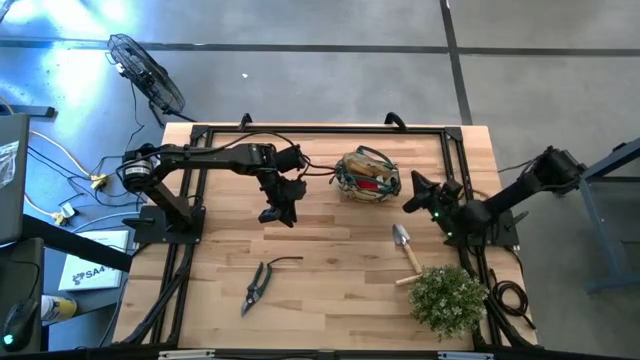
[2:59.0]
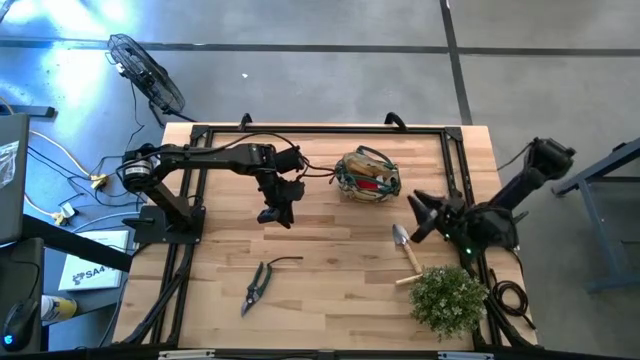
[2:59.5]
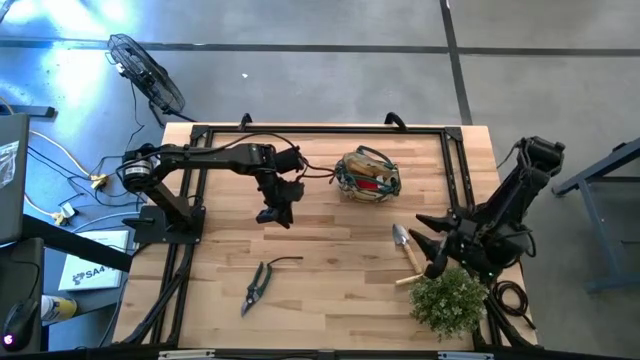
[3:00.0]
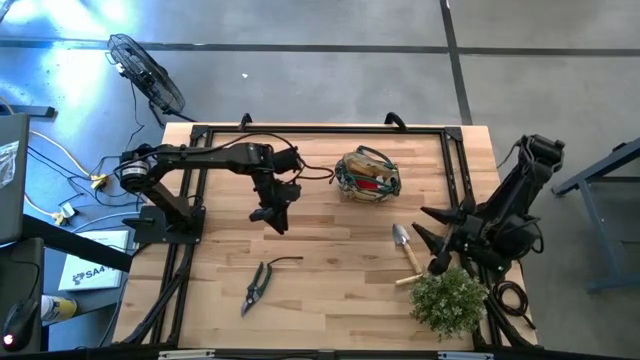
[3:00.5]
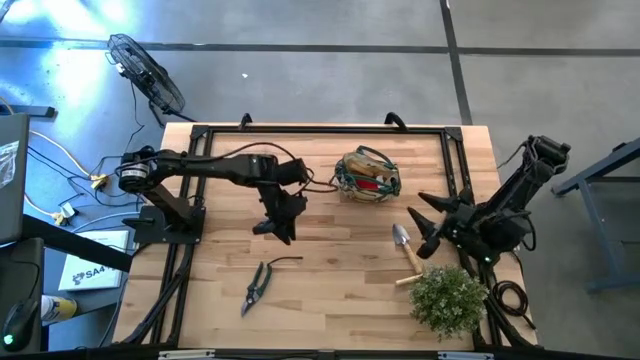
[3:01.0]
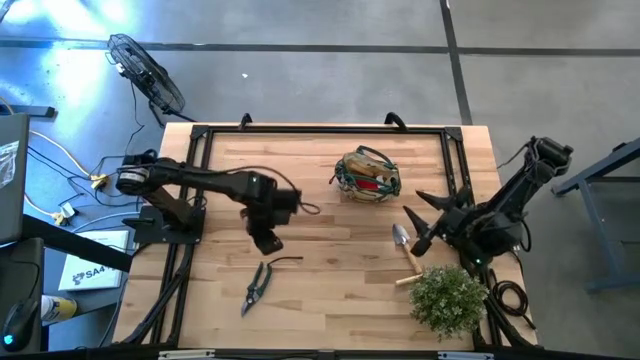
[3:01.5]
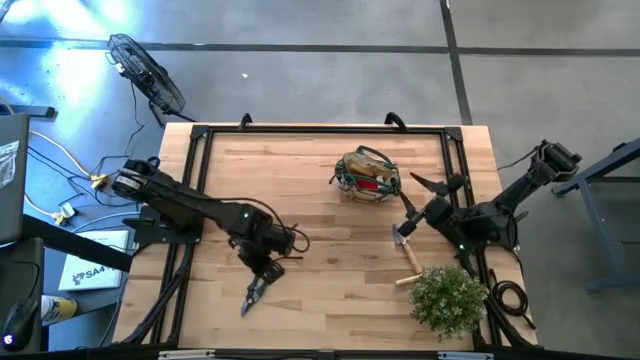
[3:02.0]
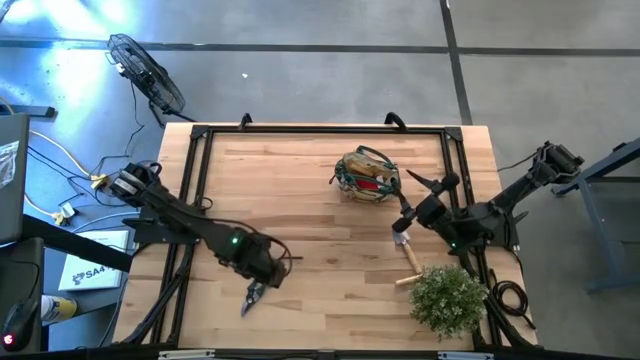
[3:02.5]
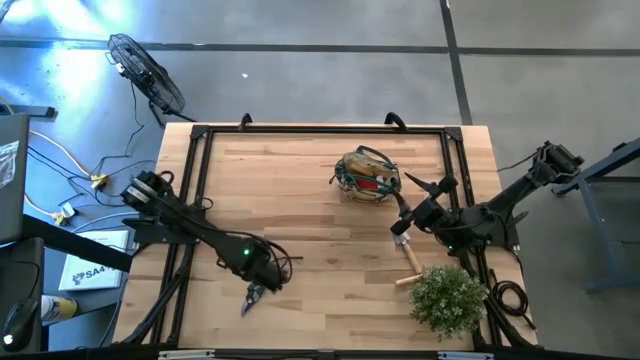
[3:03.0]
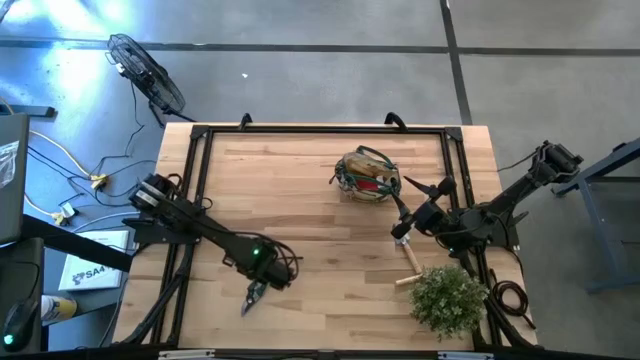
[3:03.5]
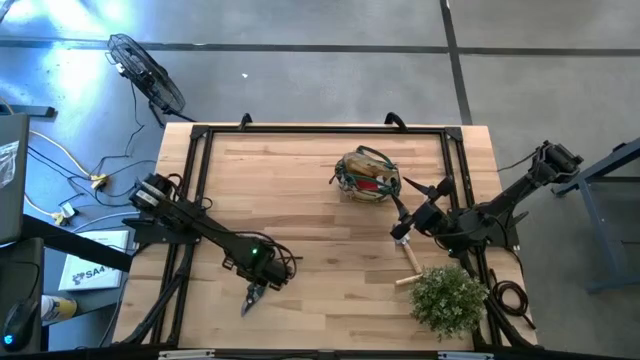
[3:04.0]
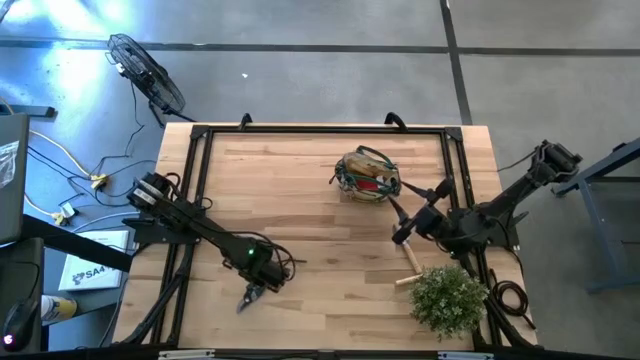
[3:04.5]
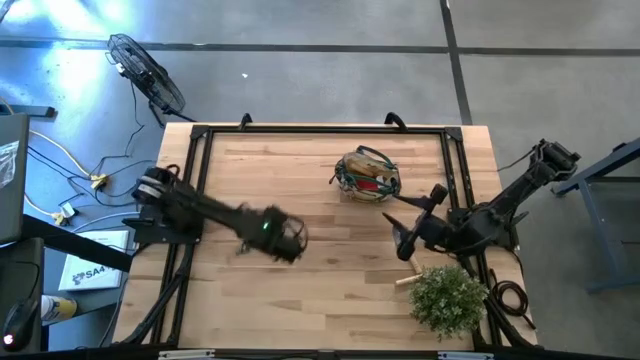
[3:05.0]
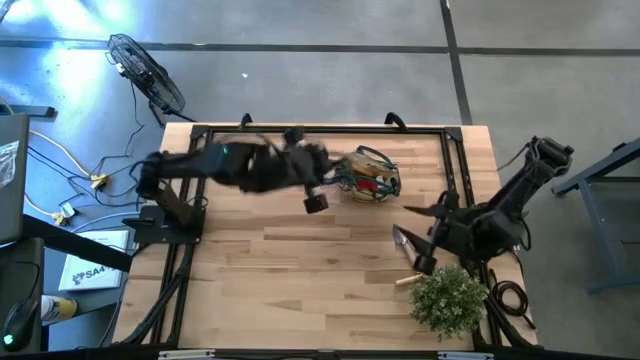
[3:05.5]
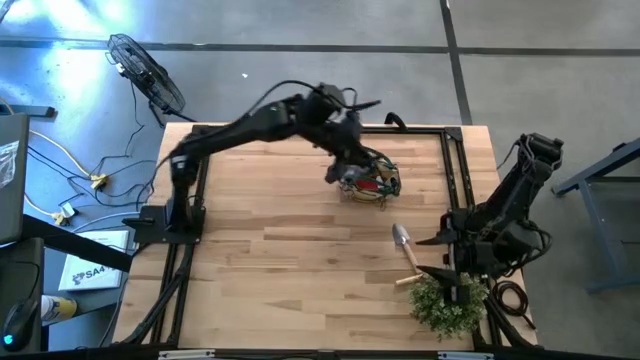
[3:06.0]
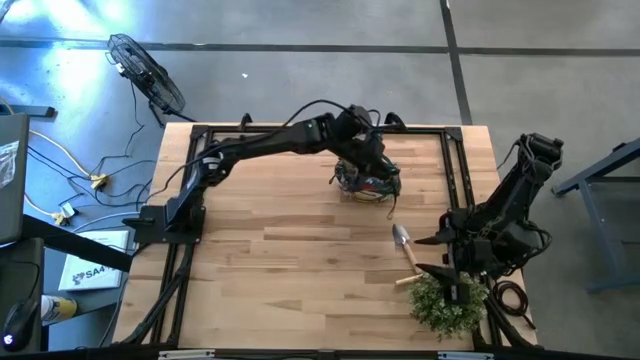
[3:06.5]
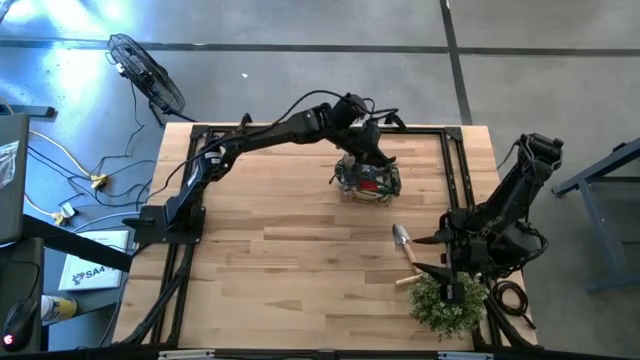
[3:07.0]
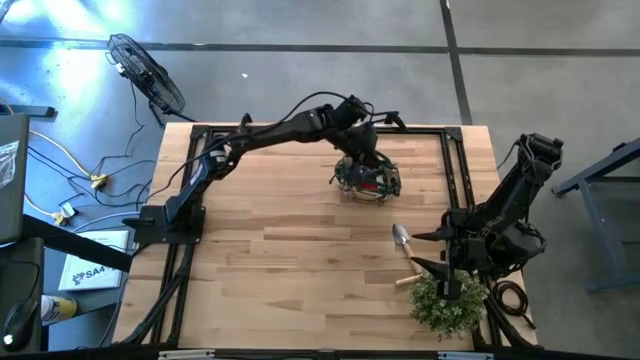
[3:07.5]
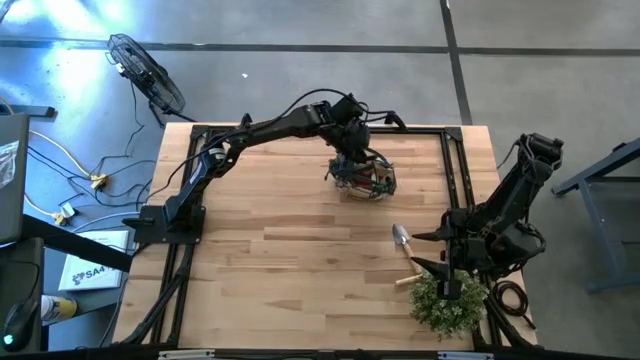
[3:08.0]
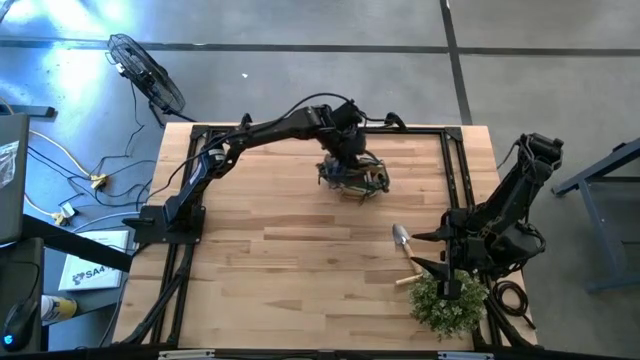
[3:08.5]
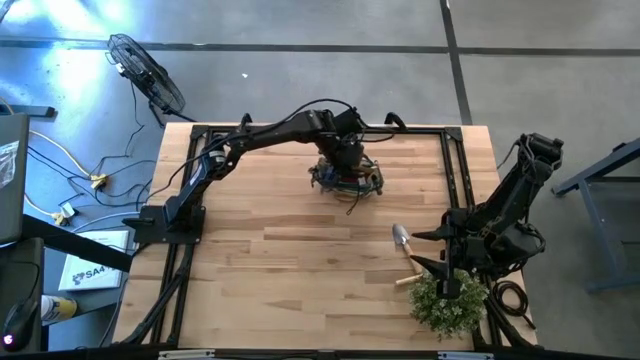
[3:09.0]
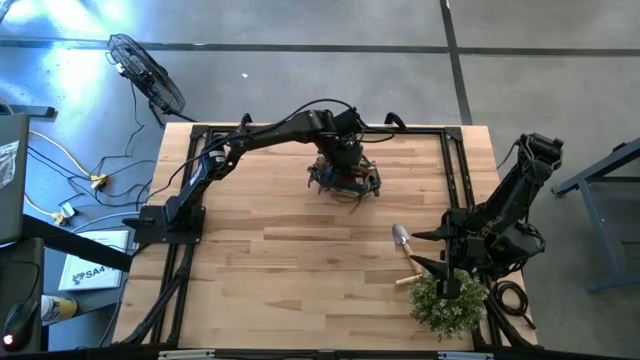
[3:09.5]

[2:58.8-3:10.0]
Task: Pick & Place Garden tools in Gardening bag
Put the green shear scissors into the light brown gardening bag

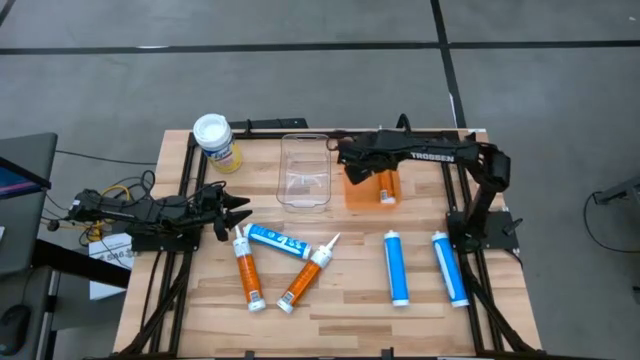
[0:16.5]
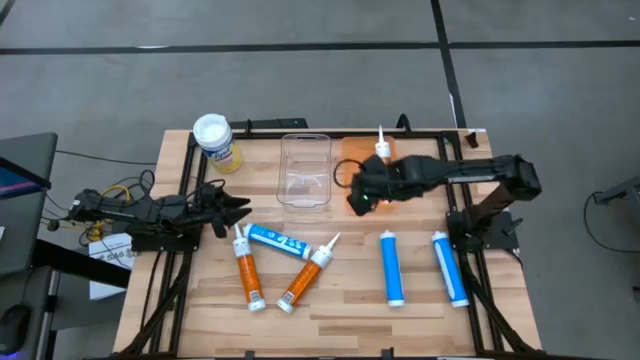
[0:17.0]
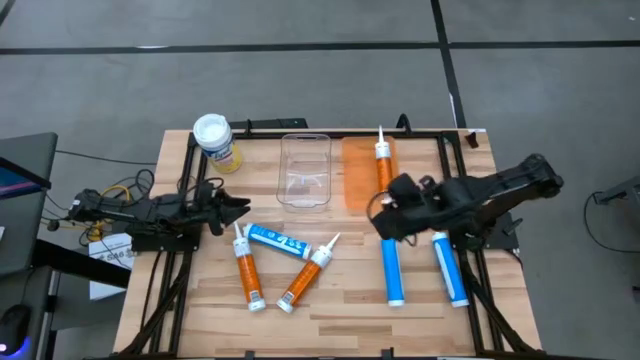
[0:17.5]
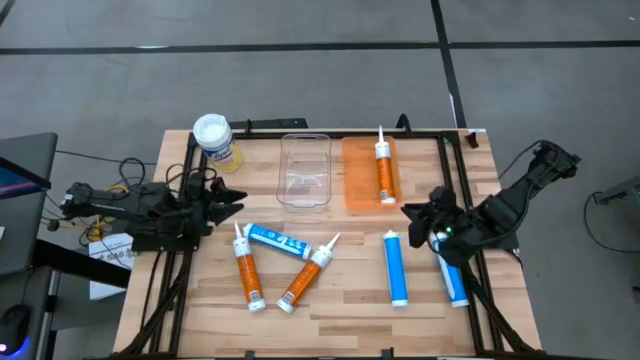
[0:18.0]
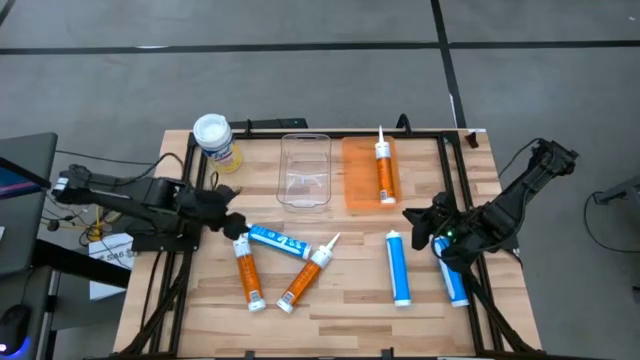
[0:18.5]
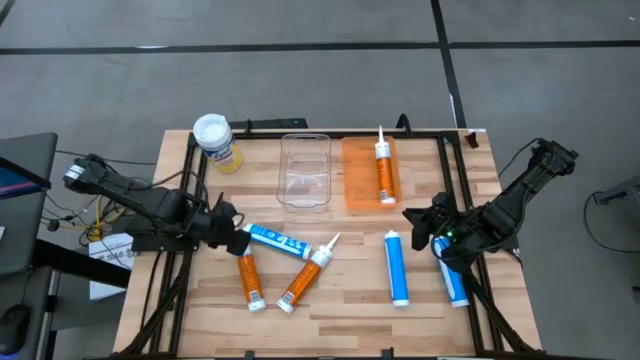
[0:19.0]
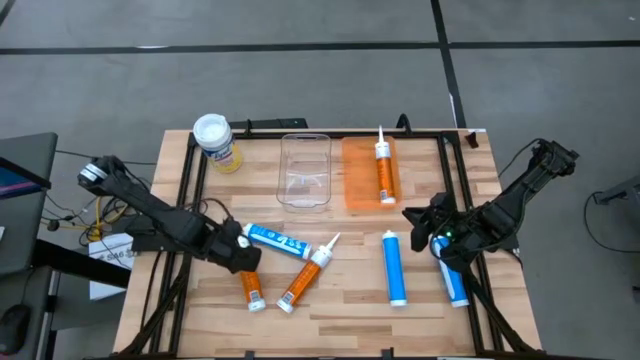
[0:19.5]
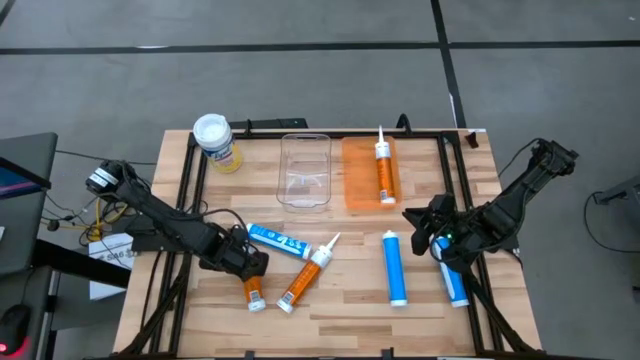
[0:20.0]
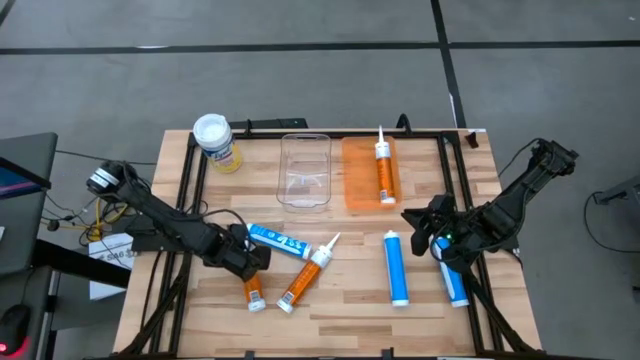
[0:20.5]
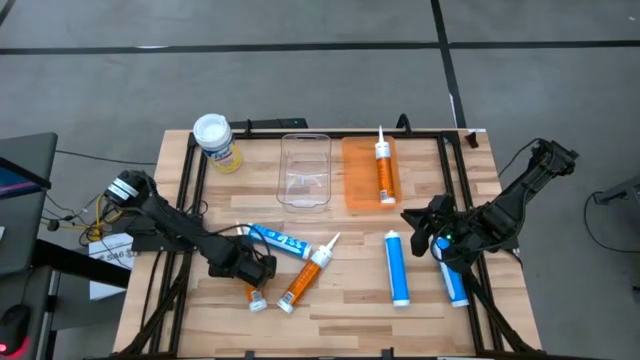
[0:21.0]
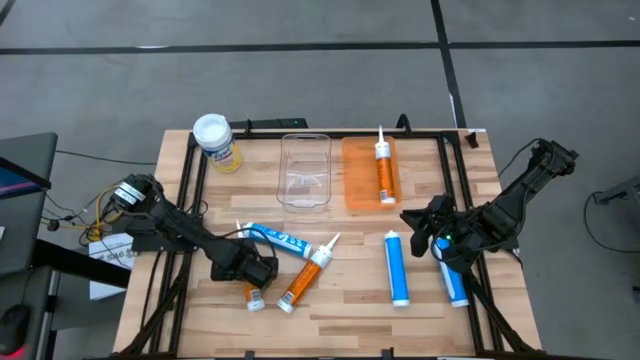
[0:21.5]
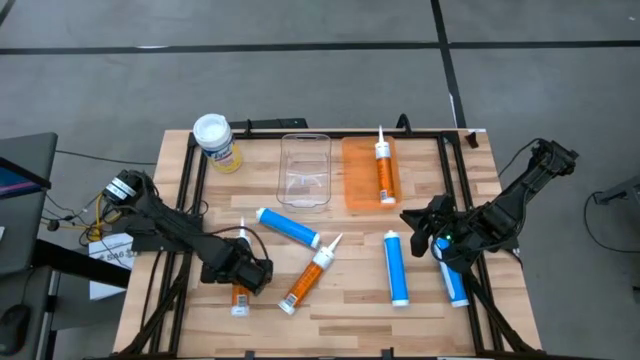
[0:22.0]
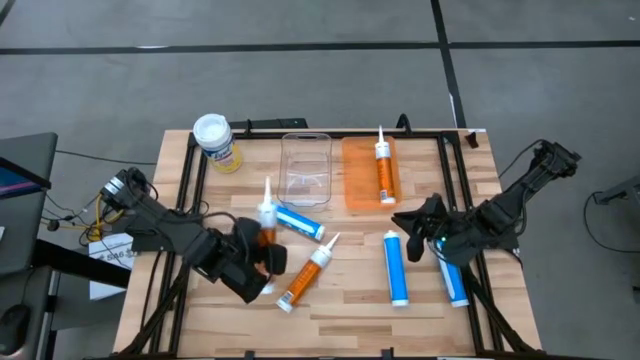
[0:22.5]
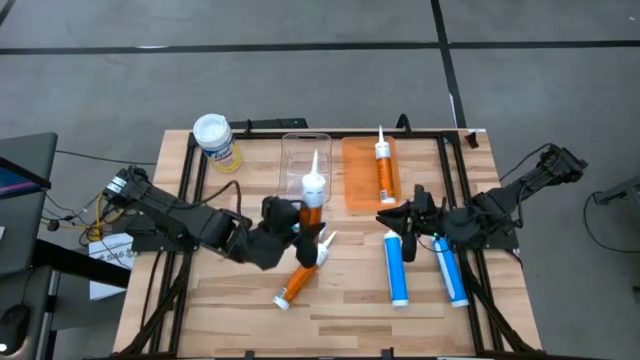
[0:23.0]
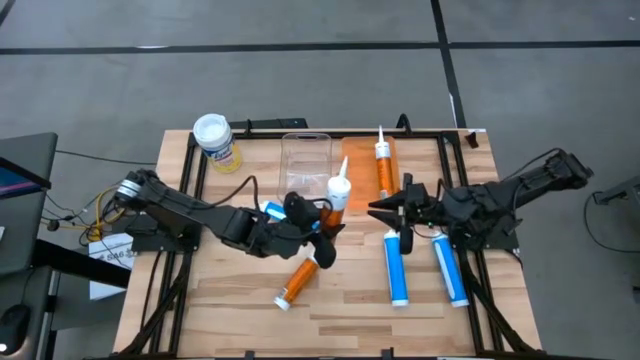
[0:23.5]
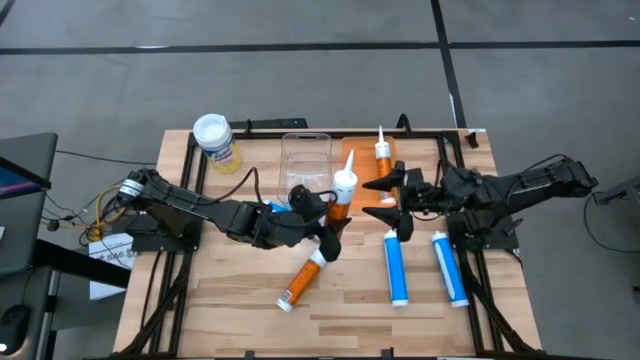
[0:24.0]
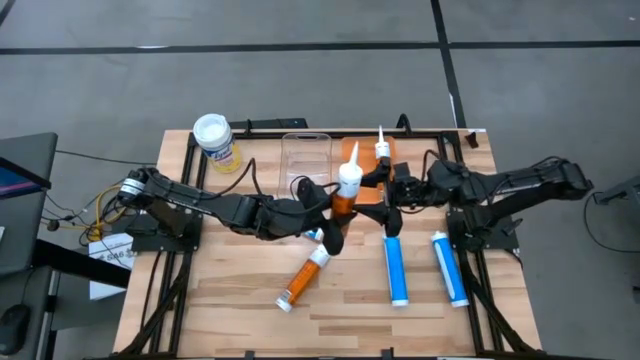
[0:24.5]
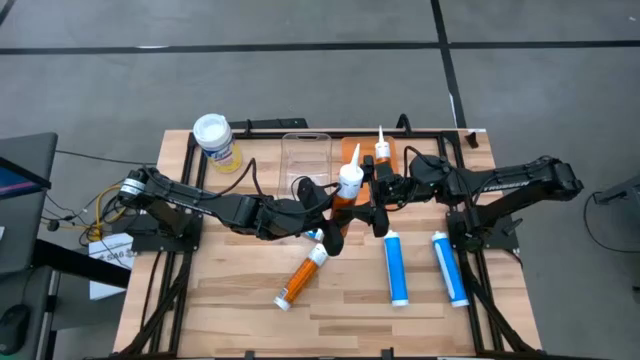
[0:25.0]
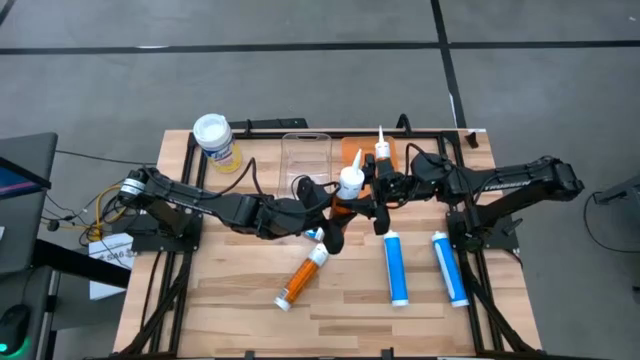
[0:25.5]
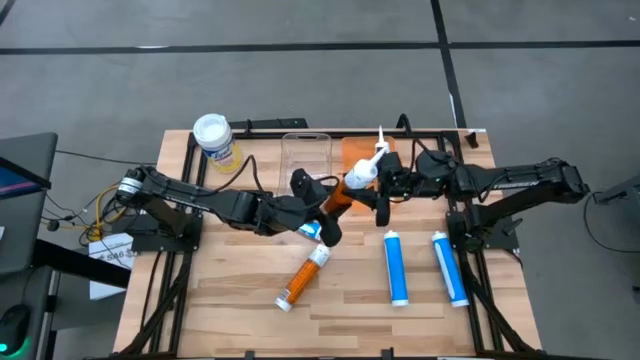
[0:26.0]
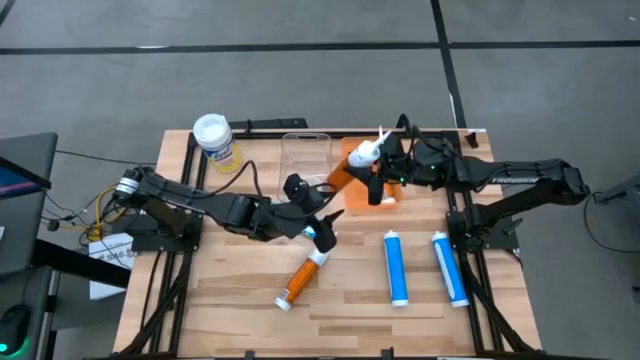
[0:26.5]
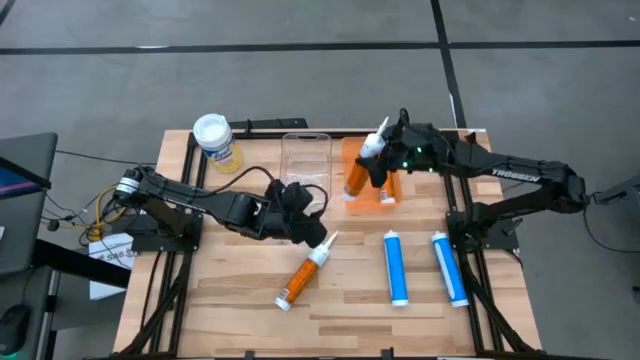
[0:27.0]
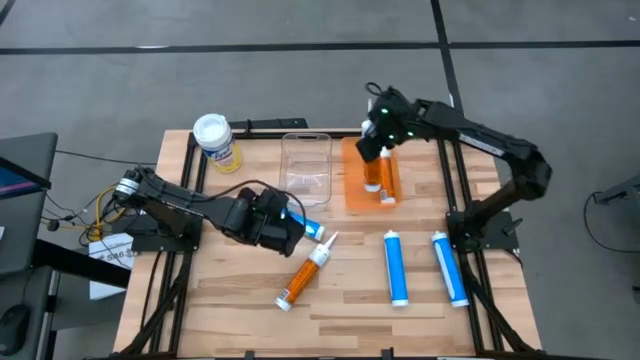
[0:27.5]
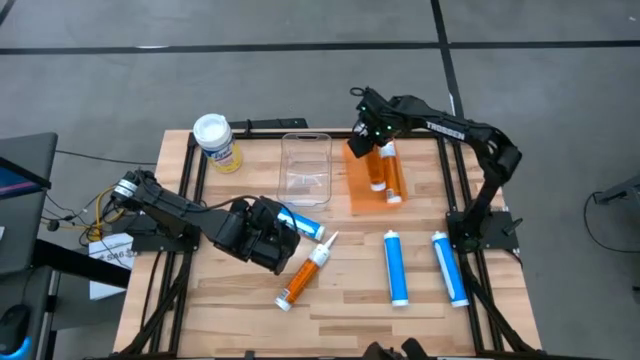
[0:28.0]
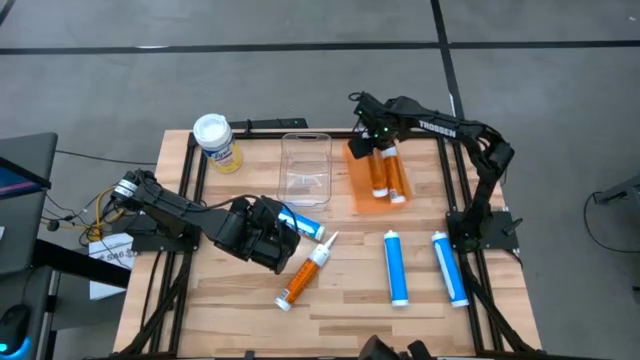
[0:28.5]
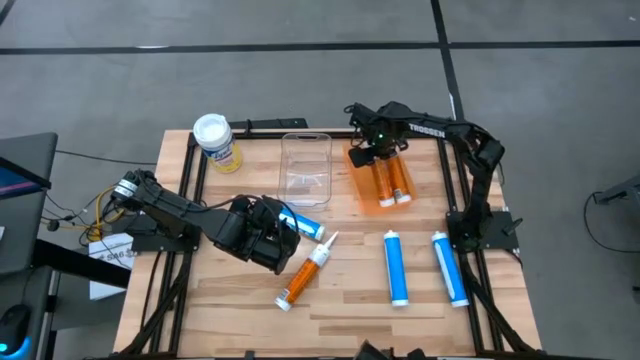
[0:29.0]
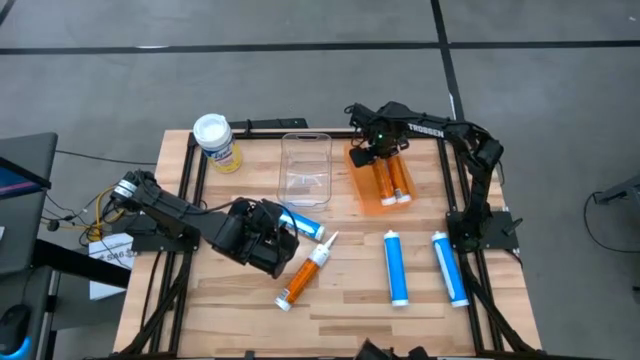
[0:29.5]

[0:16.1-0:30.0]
Task: Pick & place silicon tubes, Sealant and Lysol wipes
Put the left orange sealant into the orange bin
